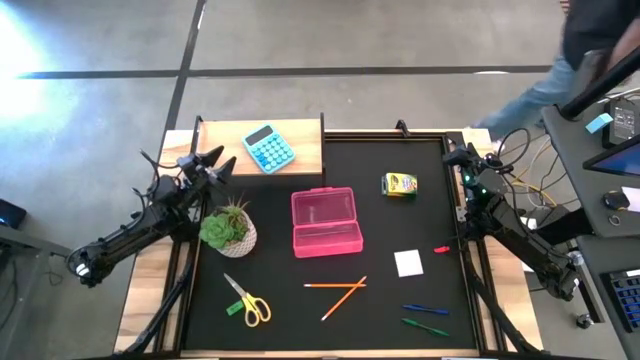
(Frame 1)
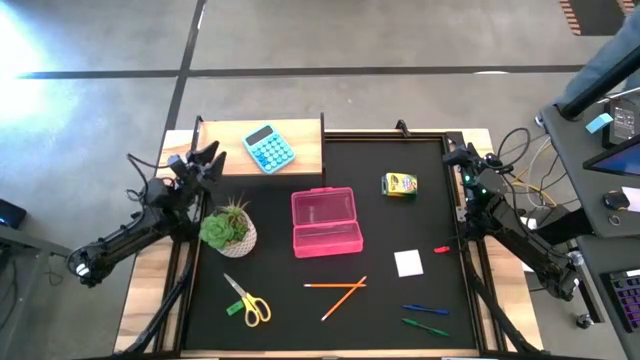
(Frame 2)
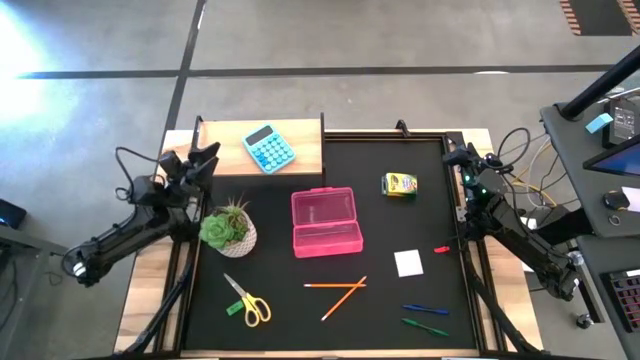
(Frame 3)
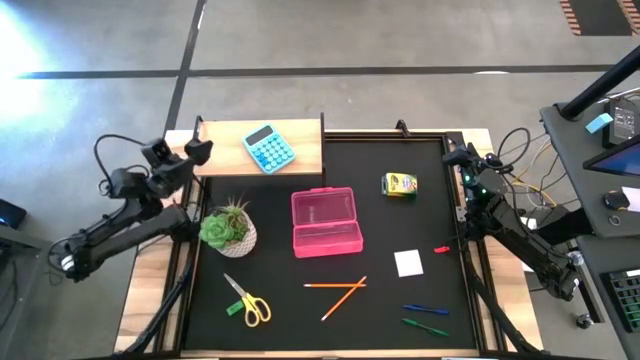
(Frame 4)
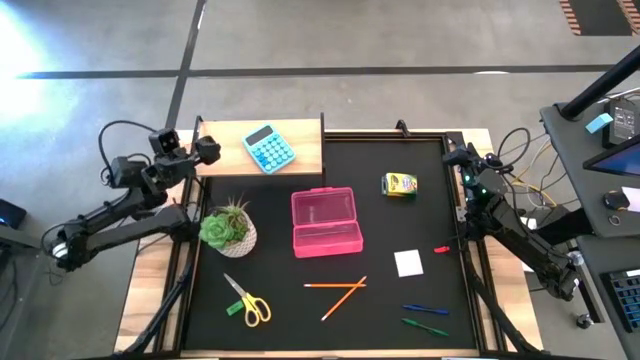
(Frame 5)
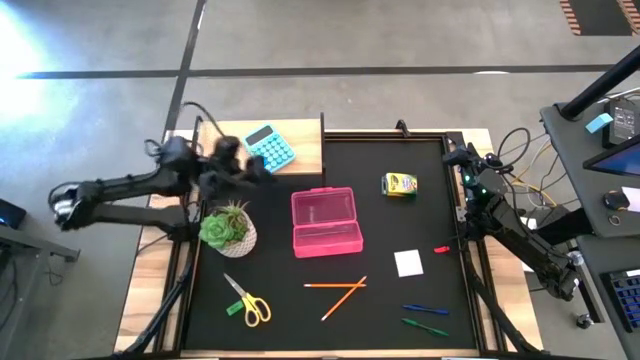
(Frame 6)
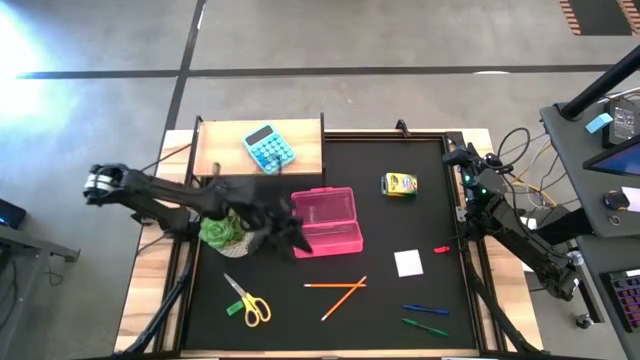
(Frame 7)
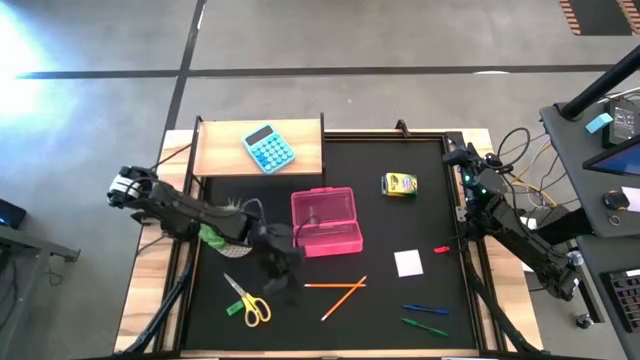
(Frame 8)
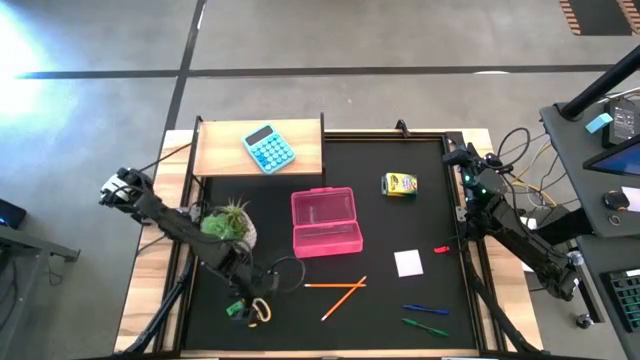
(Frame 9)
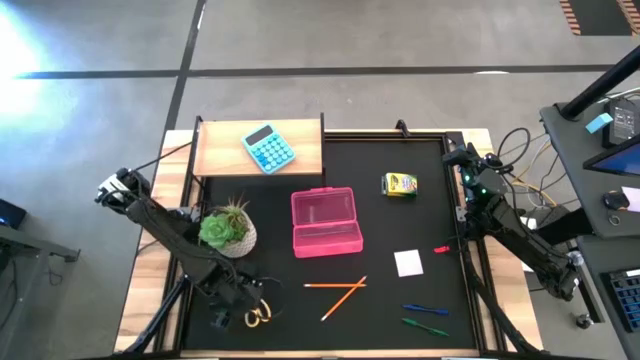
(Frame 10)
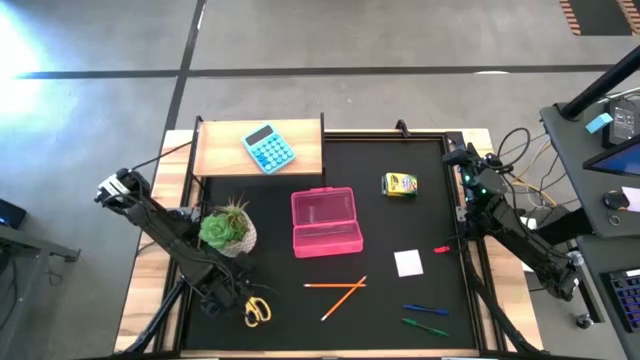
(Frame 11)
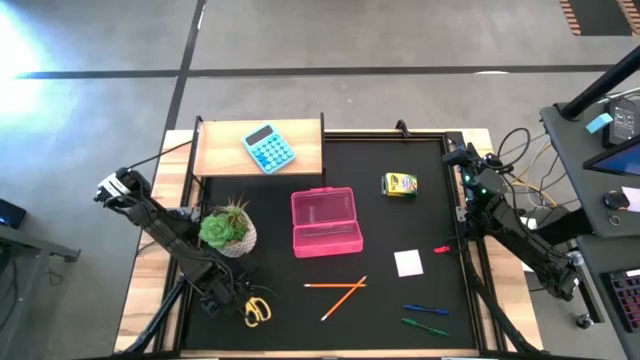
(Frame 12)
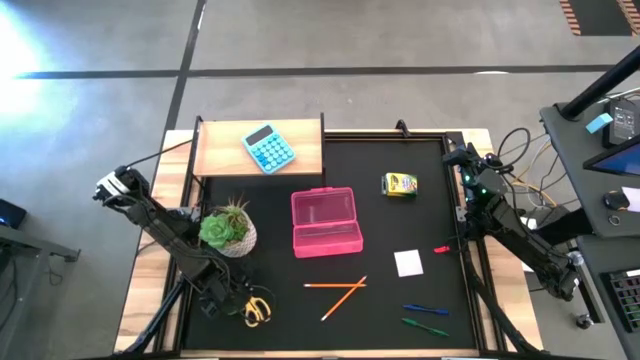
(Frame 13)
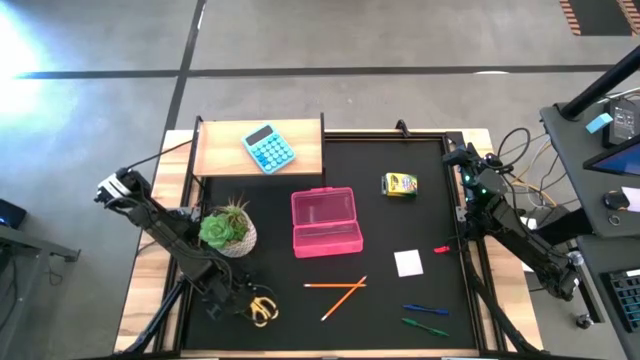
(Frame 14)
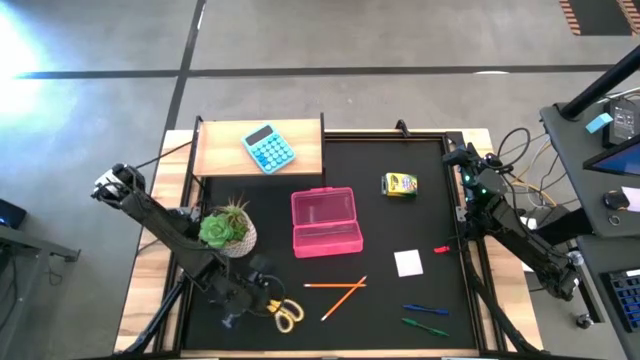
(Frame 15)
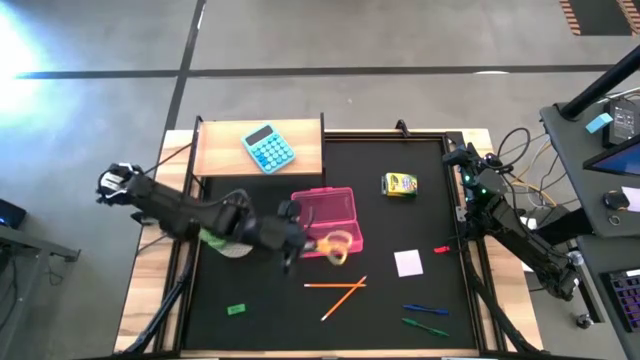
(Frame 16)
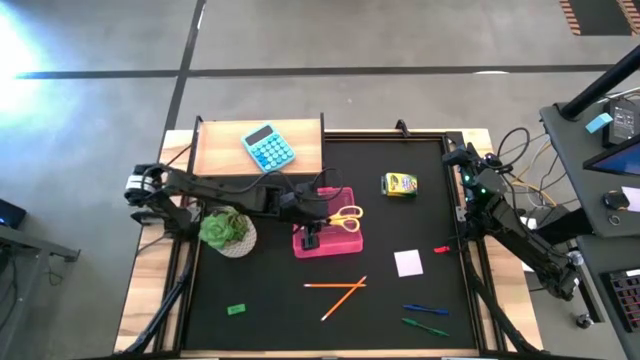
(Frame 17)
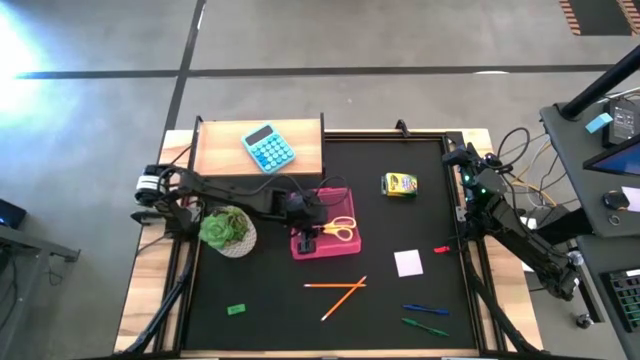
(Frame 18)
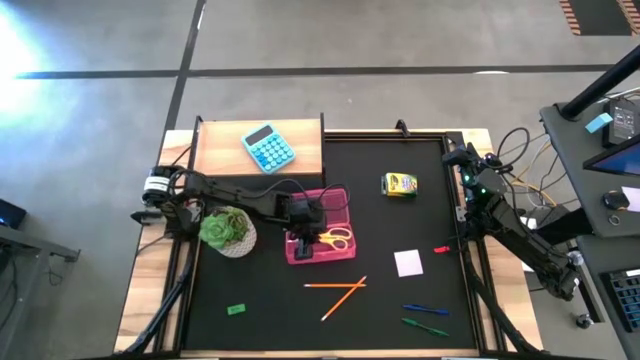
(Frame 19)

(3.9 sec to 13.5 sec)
Task: Pack school essentials
Put the yellow scissors into the pink box

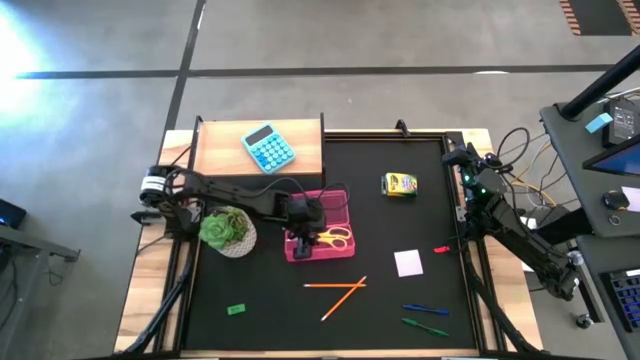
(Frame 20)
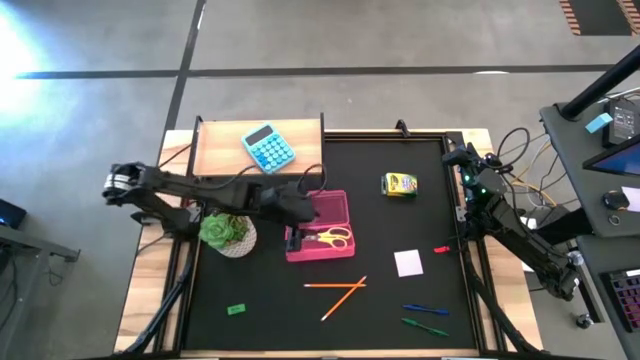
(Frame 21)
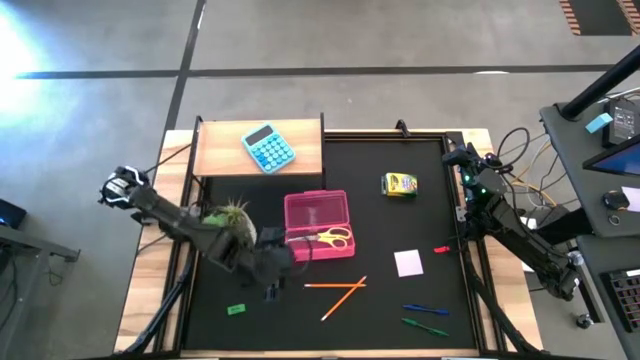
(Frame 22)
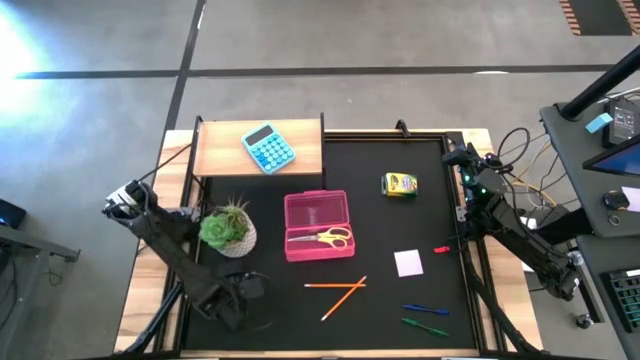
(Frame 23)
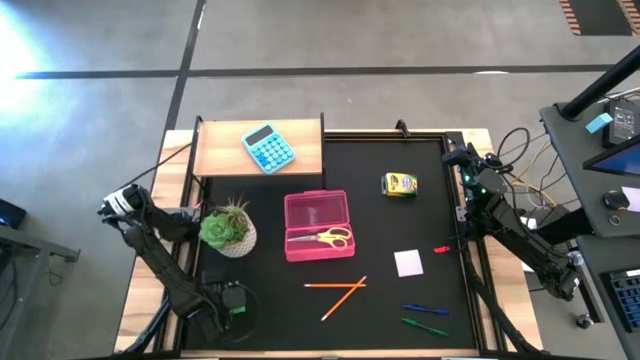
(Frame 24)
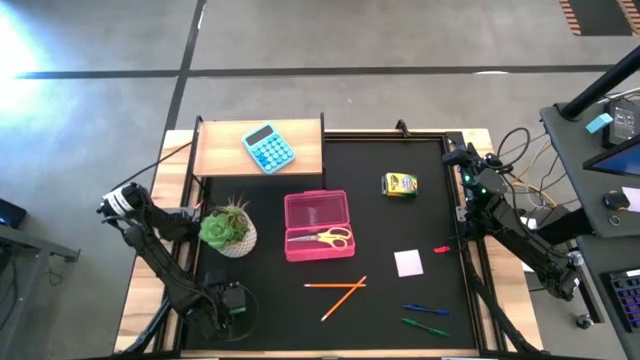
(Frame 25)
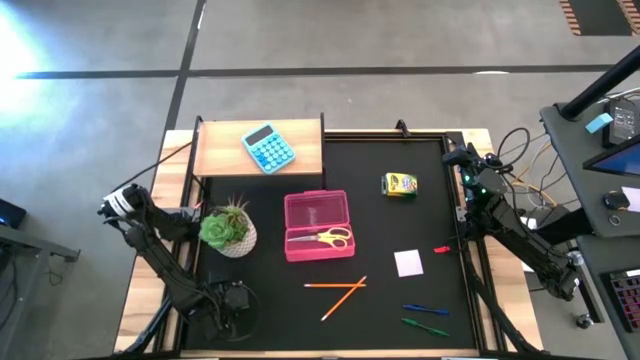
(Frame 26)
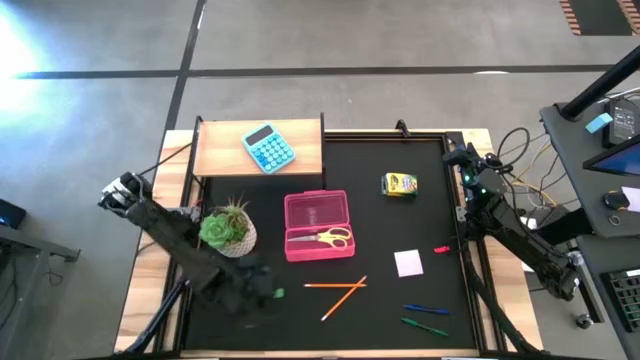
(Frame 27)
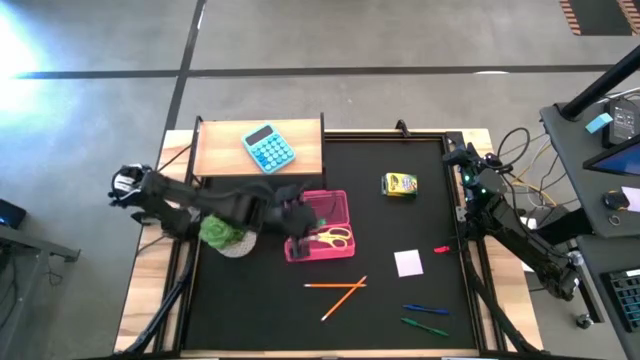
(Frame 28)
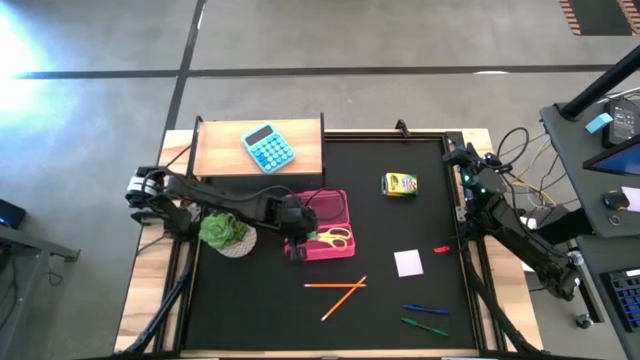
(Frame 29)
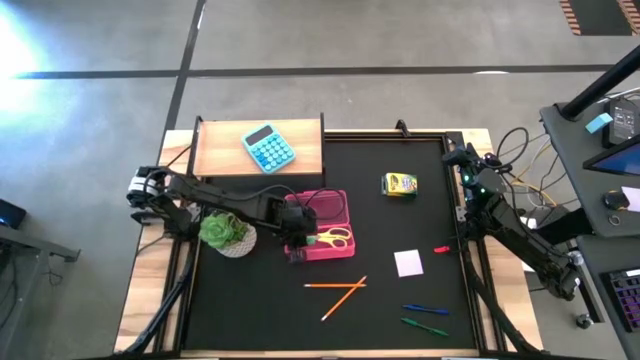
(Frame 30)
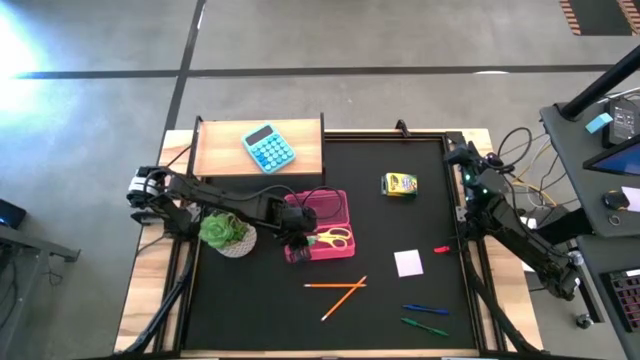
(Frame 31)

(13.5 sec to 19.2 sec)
Put the green eraser into the pink box

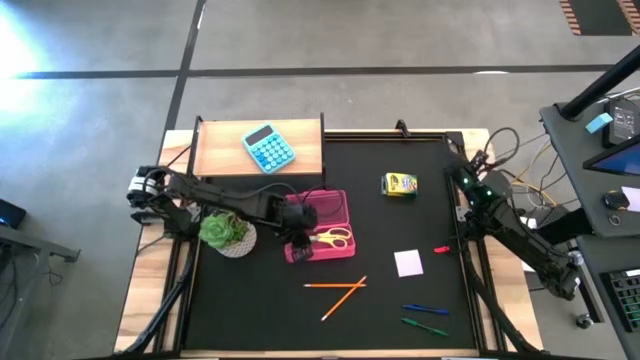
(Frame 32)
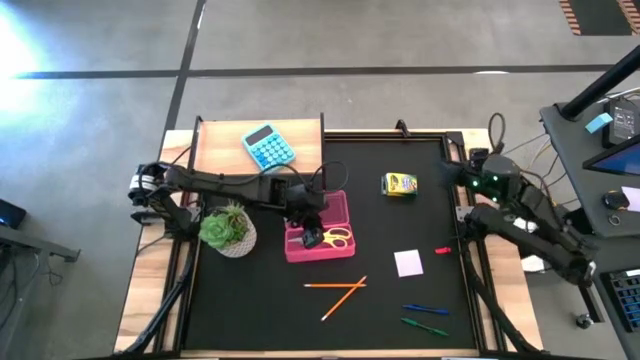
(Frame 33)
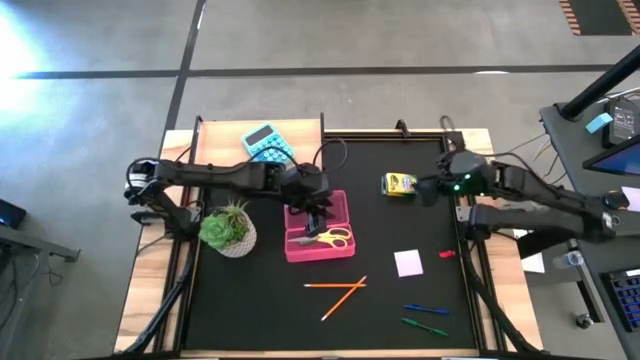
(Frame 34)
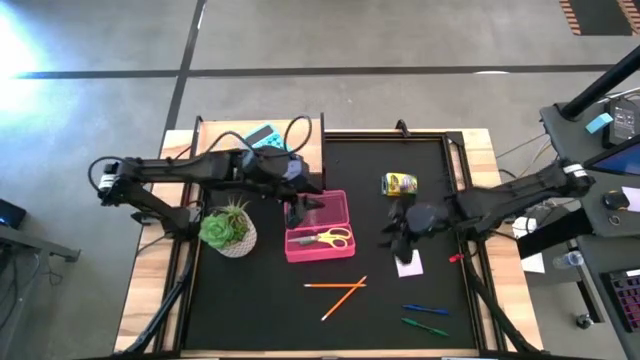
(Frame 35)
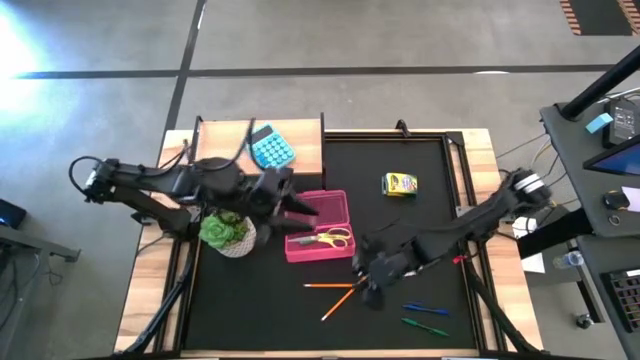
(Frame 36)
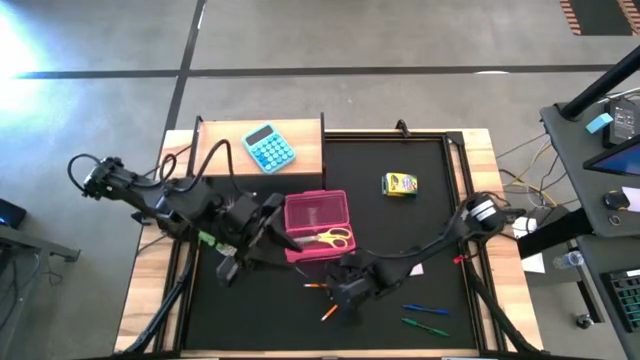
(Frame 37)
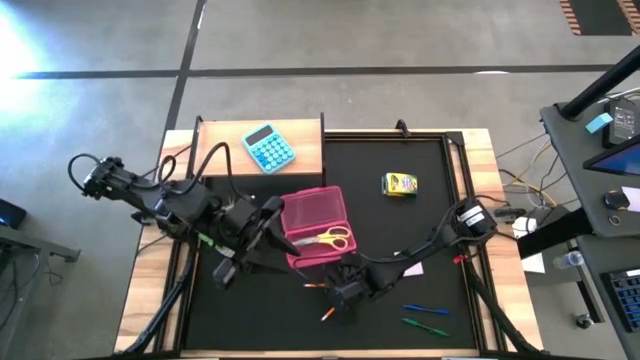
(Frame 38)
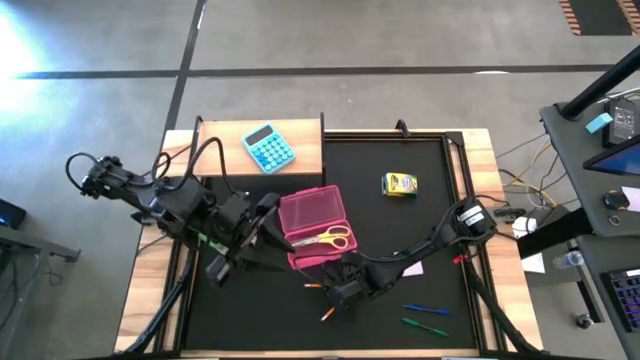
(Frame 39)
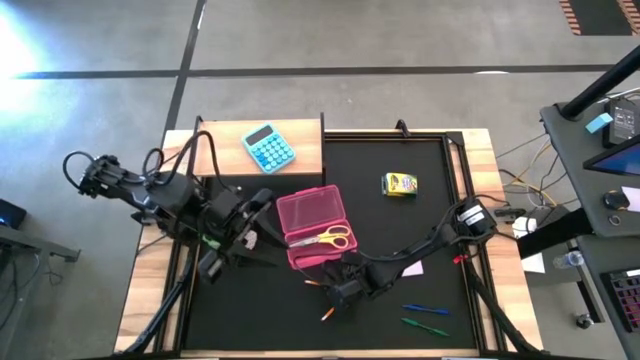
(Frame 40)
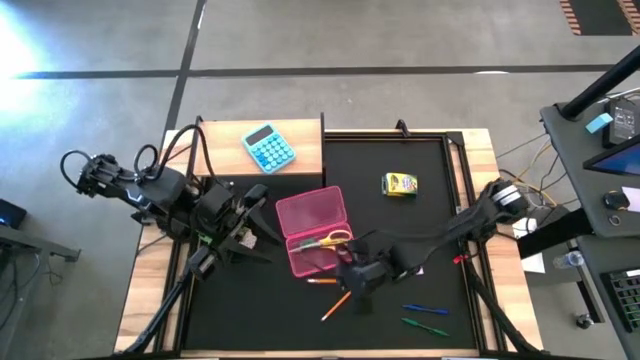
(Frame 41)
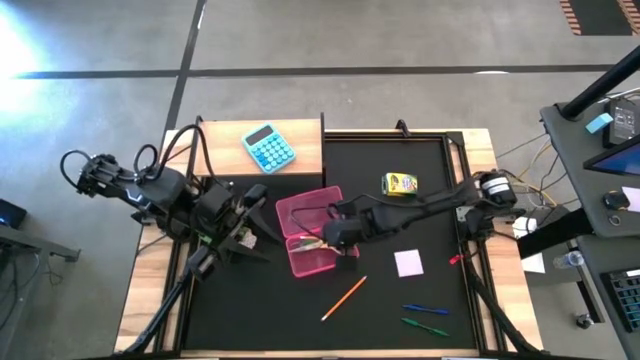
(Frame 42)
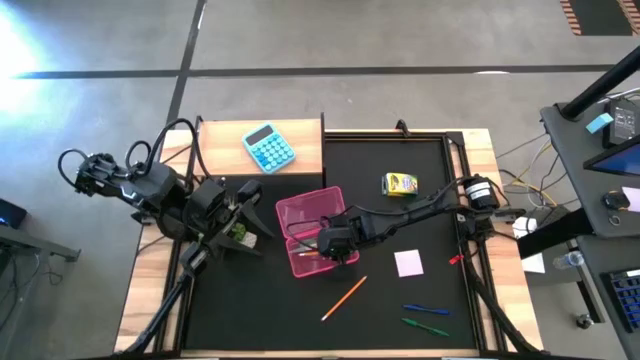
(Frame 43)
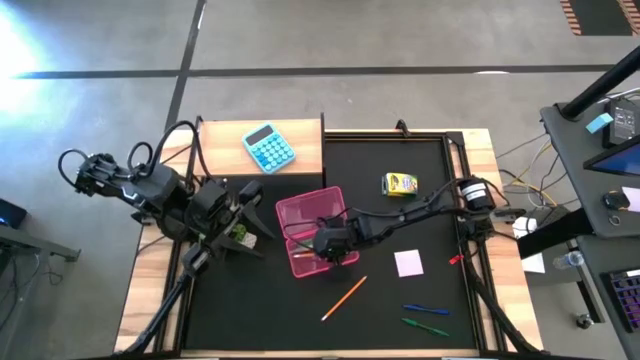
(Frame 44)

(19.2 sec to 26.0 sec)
Put the yellow pencil into the pink box
